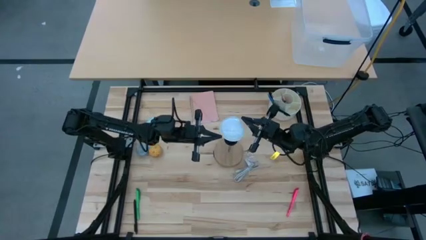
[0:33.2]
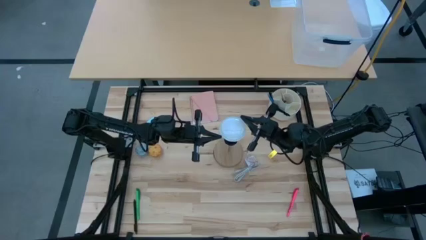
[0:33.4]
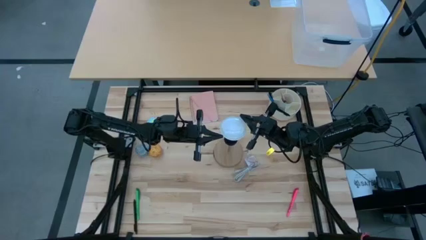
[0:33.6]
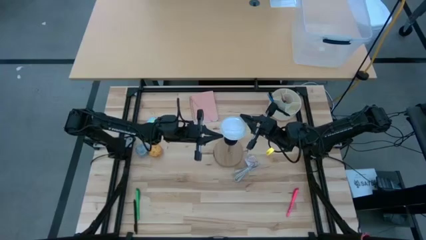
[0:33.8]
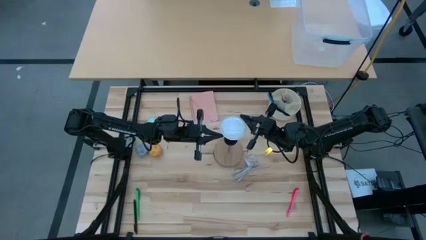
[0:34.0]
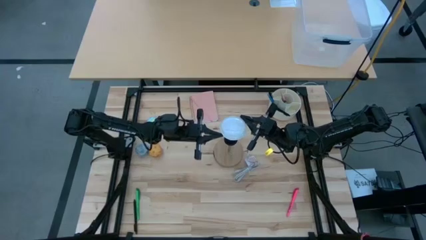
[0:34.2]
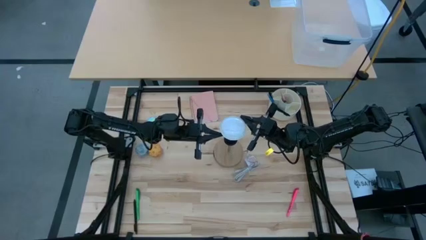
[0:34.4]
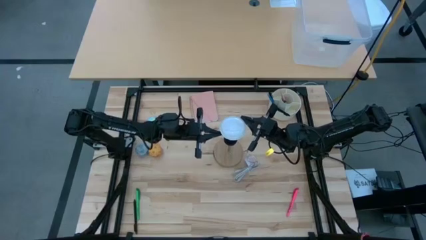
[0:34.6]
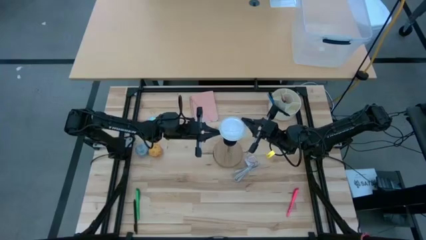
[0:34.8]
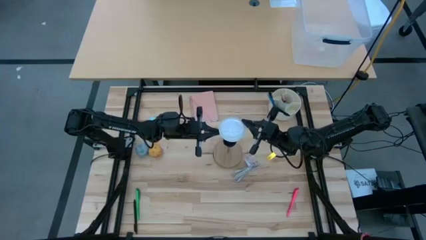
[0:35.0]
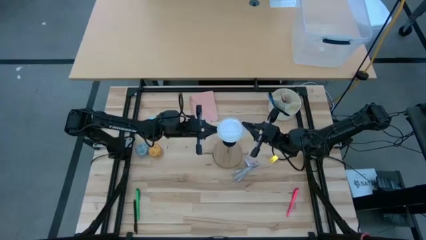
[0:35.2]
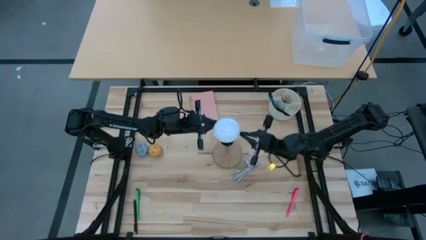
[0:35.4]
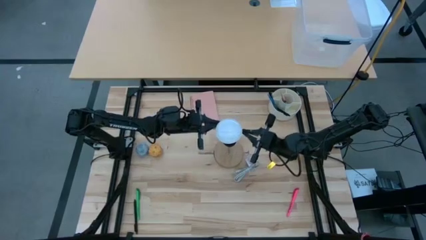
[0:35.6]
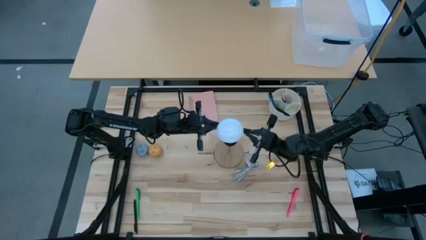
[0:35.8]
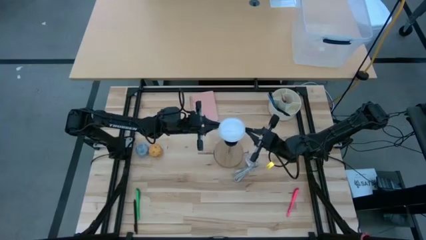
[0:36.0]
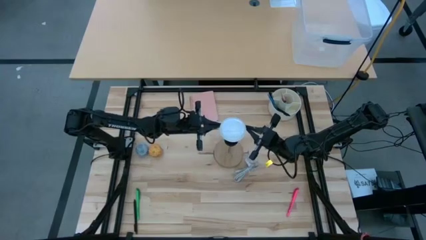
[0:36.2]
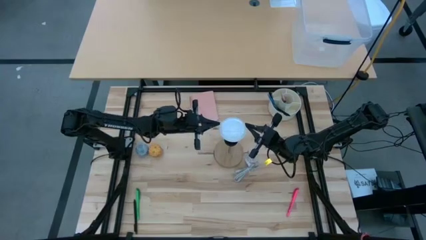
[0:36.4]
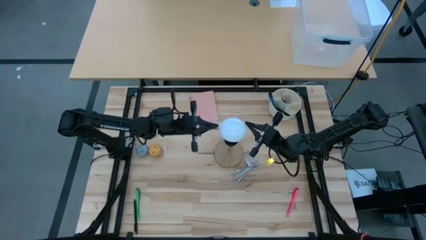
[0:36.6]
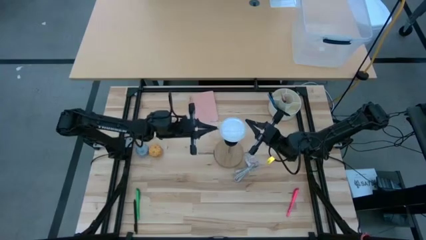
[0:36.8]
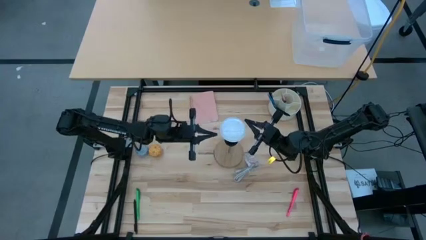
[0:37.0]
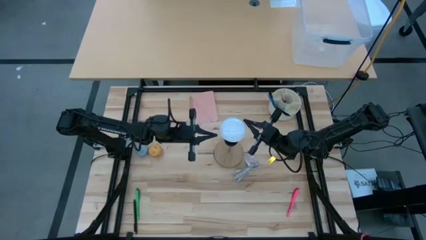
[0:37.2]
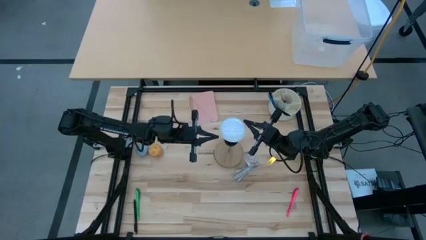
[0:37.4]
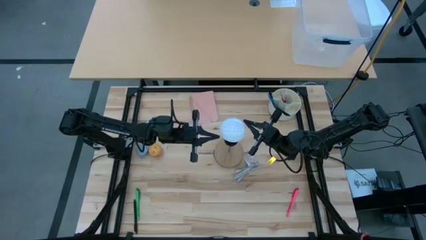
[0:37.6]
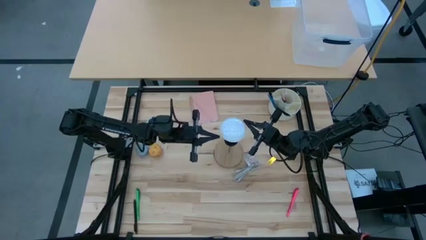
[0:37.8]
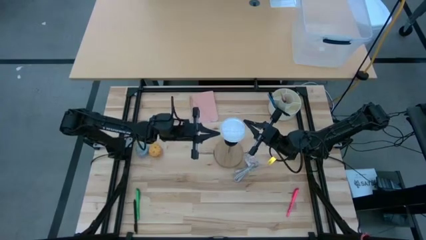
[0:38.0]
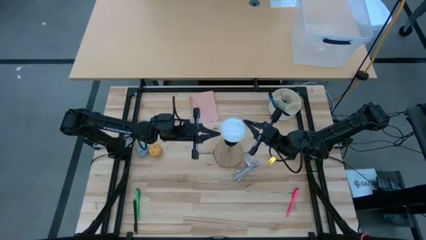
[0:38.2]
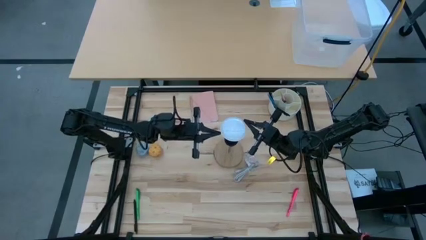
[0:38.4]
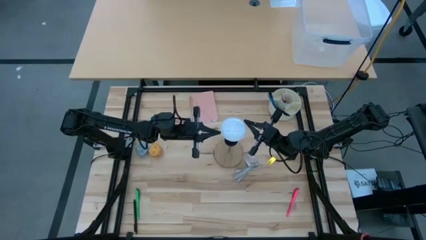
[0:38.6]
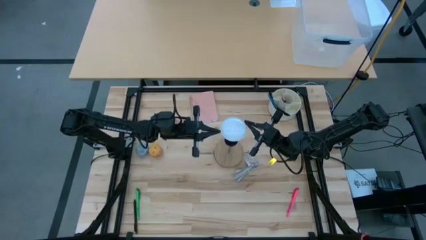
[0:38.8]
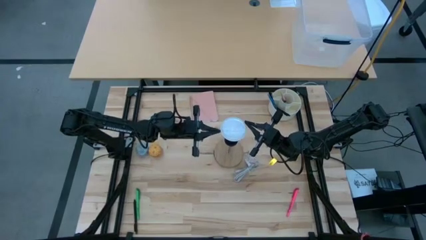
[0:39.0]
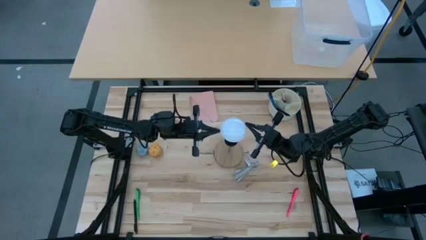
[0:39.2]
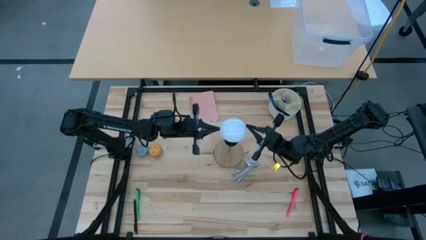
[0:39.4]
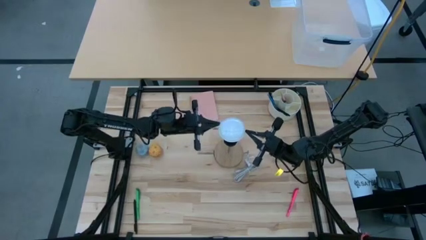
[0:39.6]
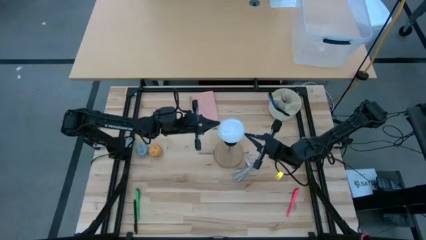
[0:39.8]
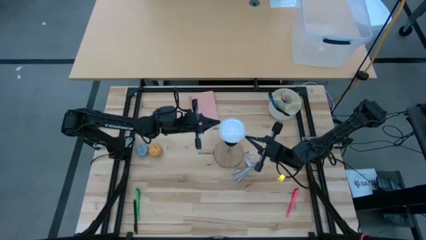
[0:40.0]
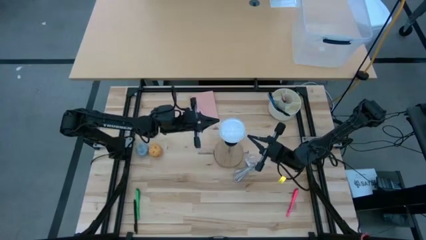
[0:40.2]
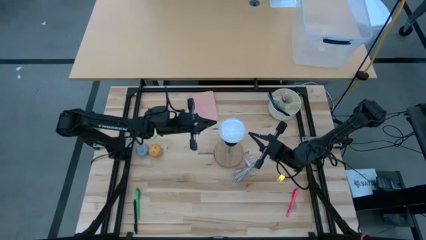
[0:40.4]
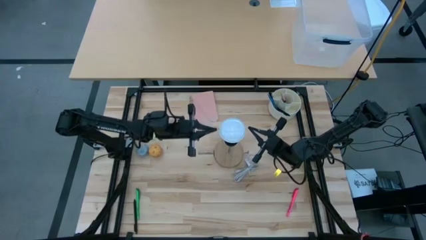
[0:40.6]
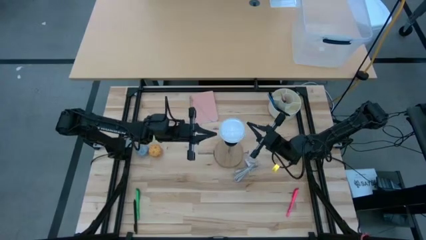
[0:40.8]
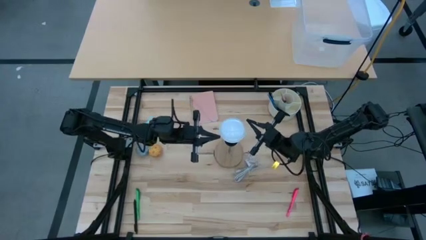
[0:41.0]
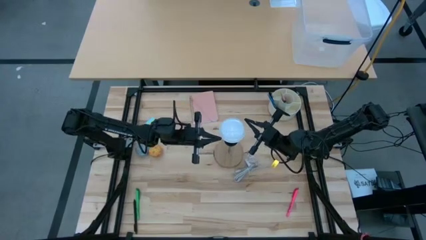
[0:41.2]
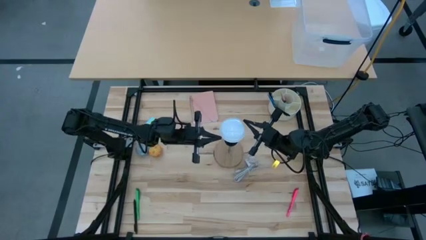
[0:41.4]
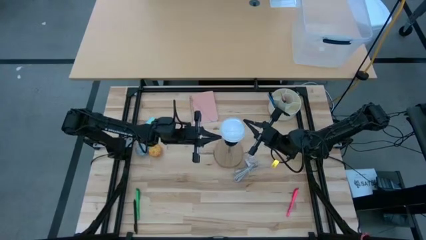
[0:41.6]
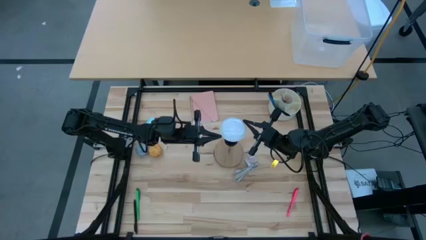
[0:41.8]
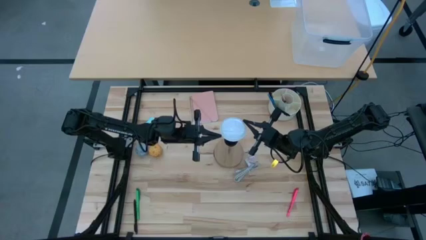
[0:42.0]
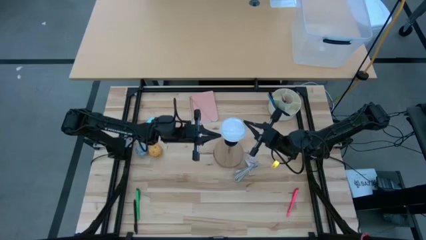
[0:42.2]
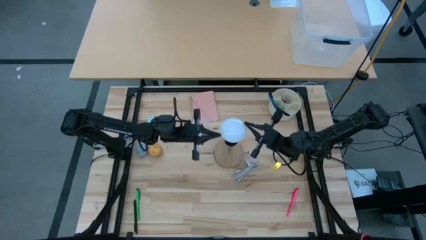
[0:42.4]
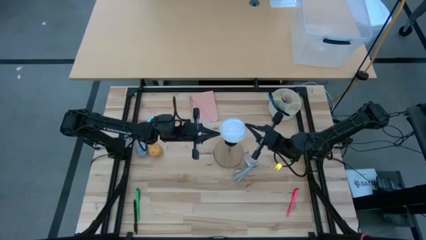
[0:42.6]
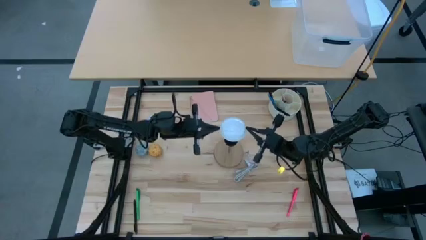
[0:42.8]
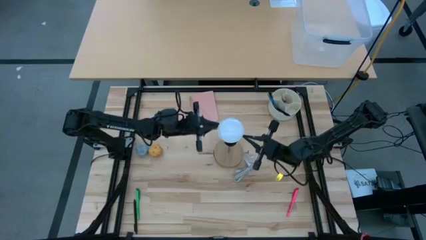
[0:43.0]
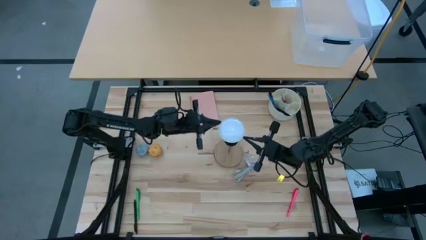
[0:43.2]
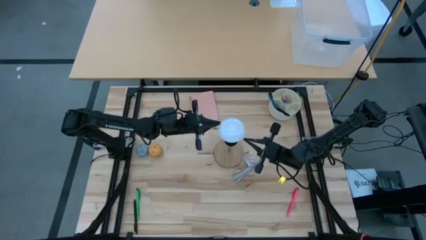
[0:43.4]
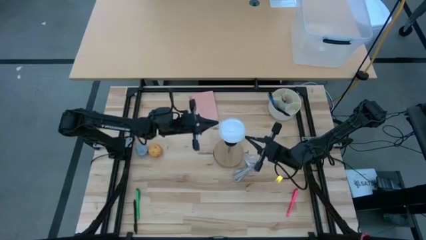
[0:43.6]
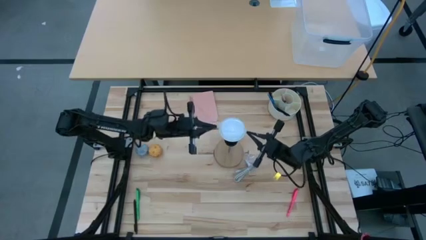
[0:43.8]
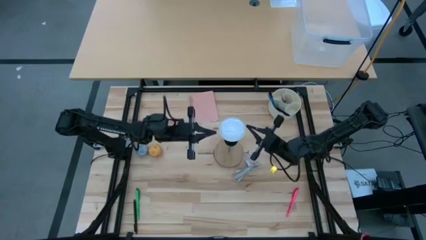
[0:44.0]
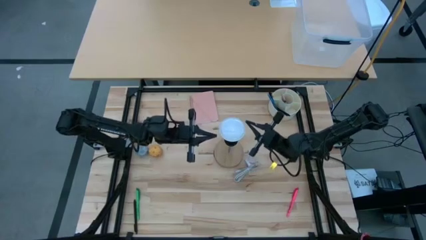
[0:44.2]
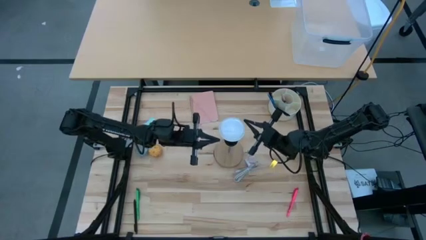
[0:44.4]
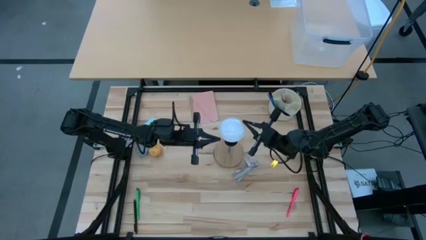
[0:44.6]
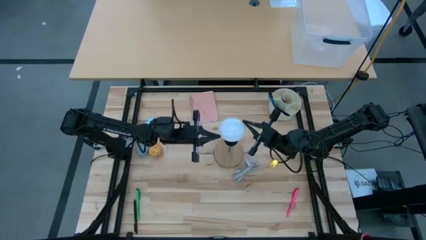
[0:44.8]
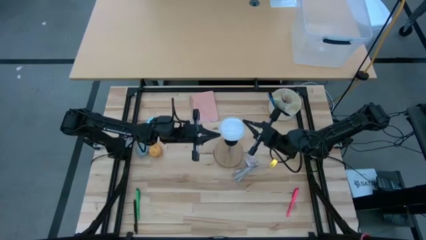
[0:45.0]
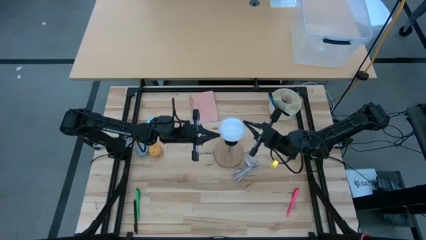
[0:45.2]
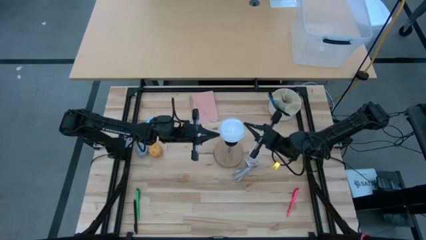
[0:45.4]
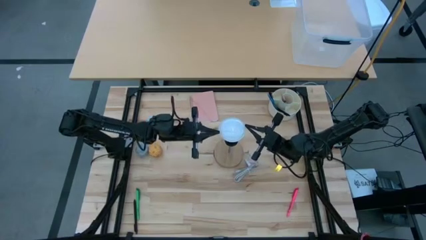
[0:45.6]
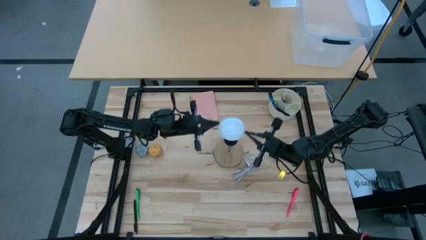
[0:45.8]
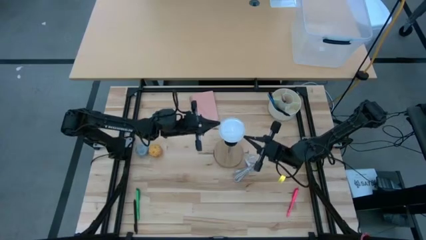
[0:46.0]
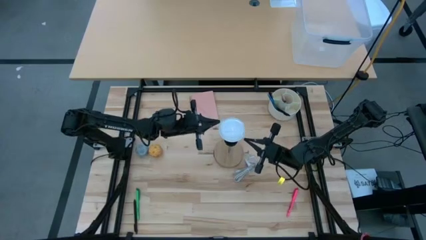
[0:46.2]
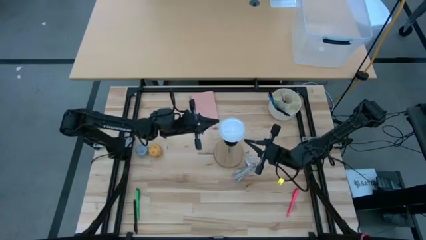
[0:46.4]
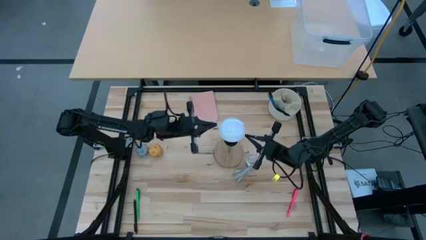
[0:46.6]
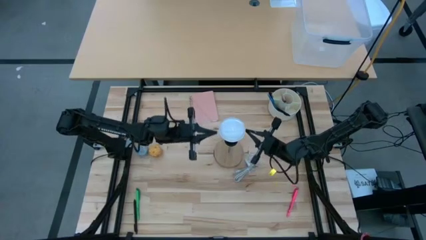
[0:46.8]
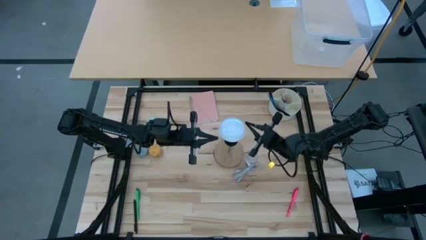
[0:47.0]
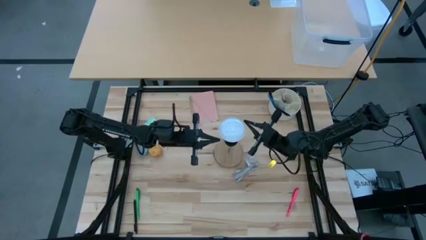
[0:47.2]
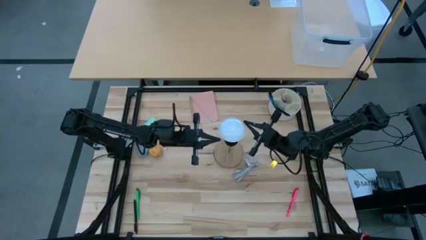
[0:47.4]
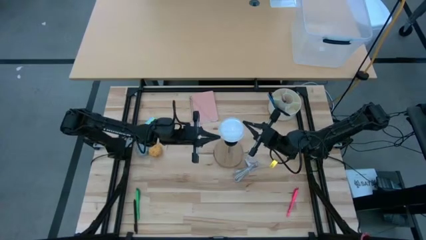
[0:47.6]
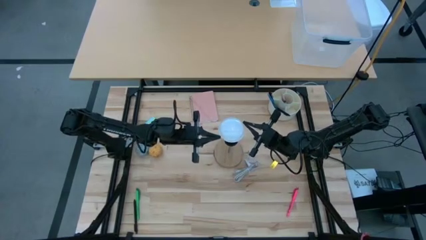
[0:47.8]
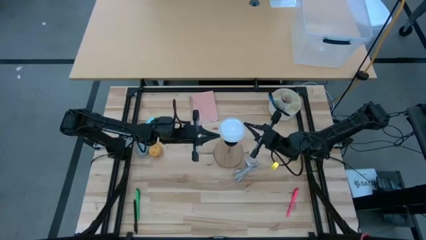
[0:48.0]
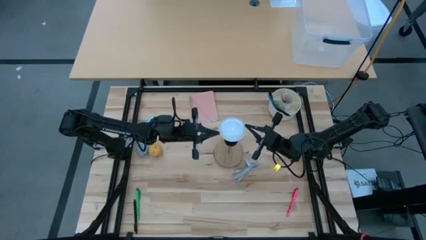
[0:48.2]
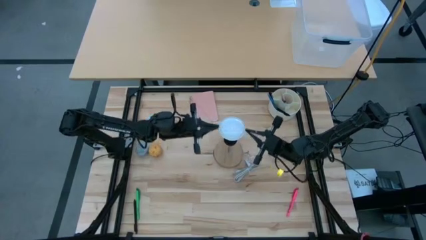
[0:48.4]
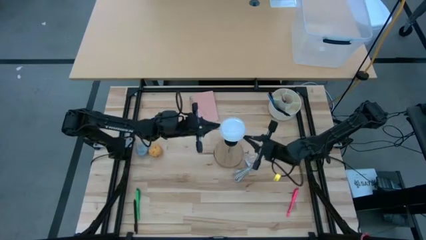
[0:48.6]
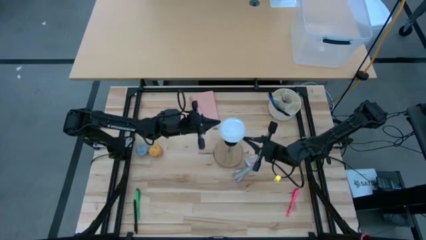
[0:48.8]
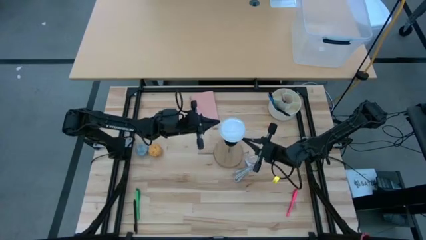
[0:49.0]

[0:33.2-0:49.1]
Task: Screw lightbulb
Insert the lightbulb into the lamp
